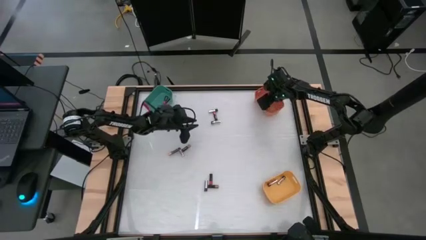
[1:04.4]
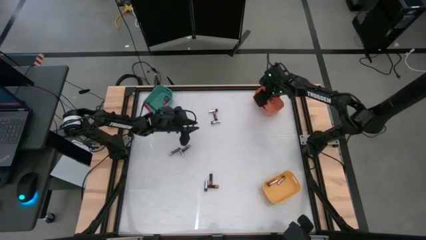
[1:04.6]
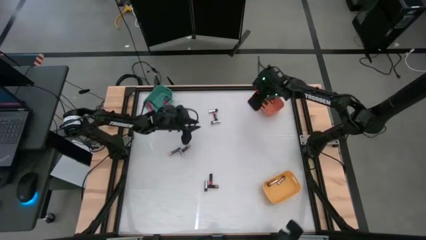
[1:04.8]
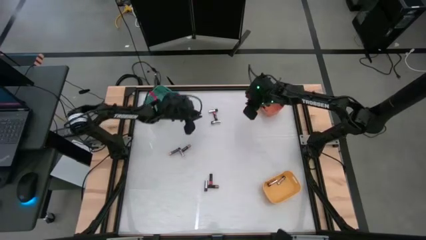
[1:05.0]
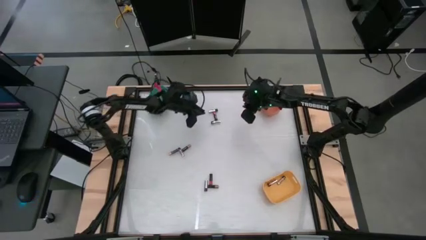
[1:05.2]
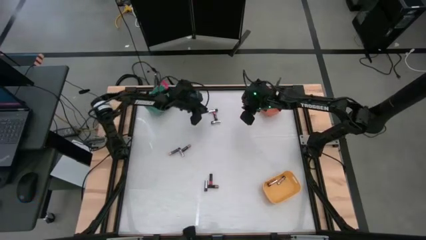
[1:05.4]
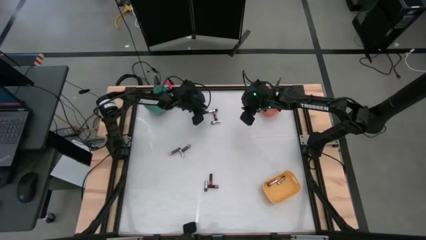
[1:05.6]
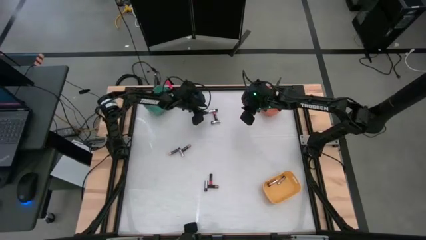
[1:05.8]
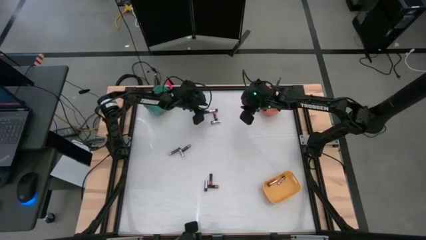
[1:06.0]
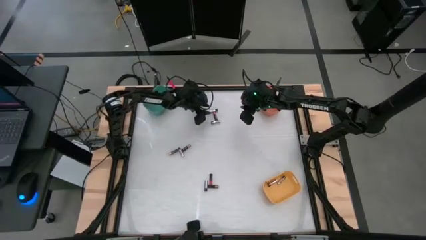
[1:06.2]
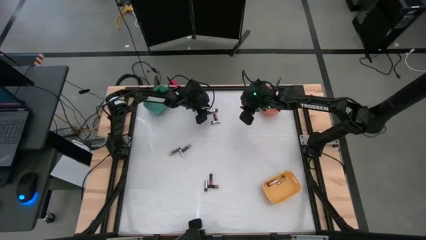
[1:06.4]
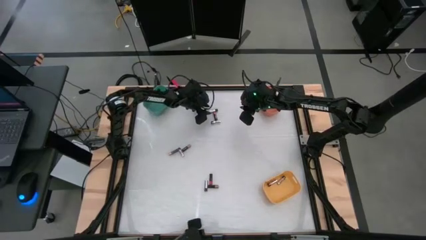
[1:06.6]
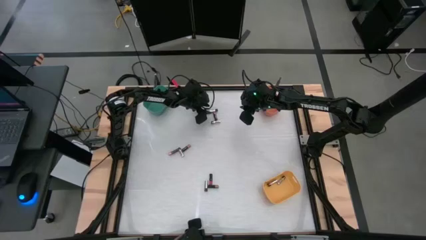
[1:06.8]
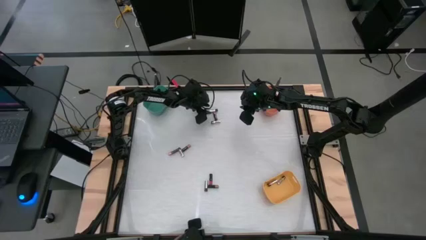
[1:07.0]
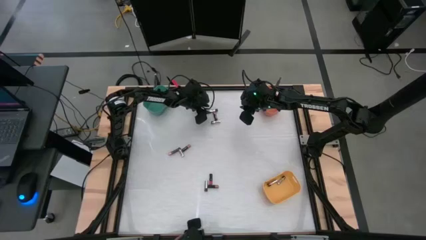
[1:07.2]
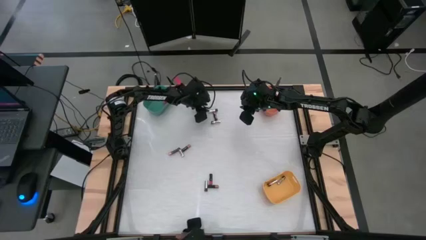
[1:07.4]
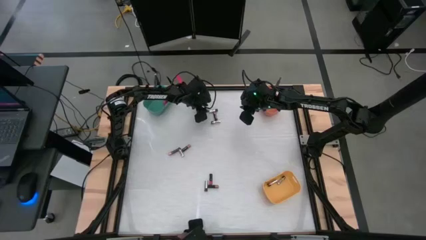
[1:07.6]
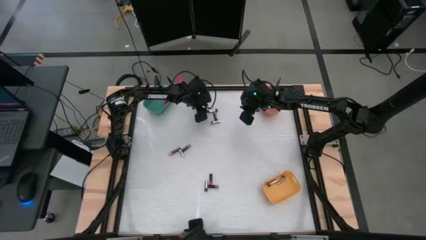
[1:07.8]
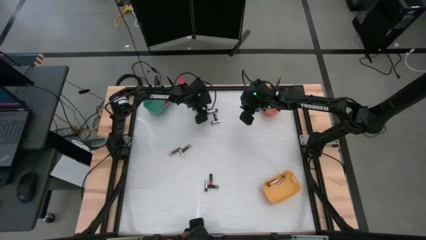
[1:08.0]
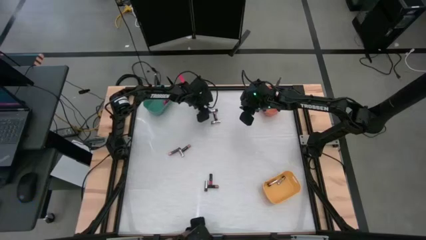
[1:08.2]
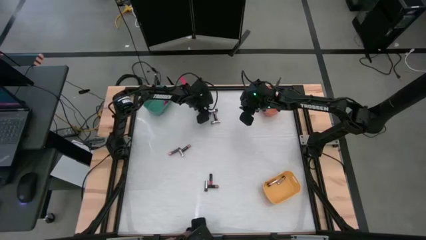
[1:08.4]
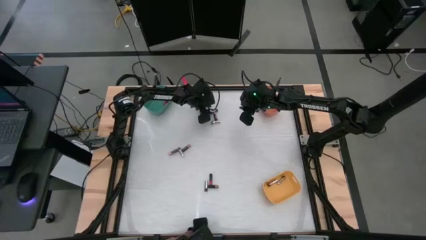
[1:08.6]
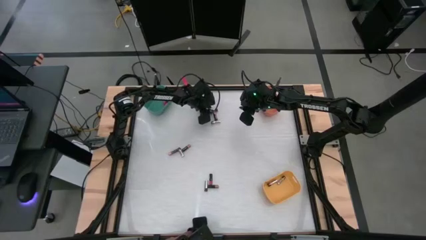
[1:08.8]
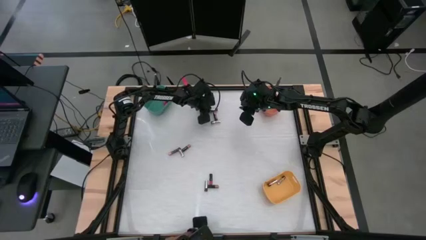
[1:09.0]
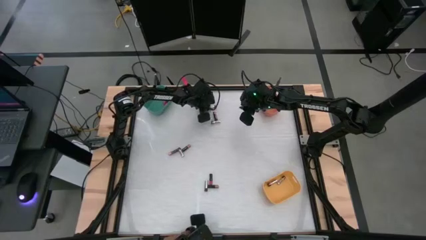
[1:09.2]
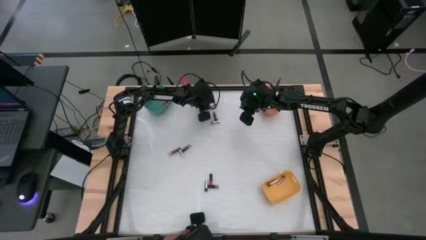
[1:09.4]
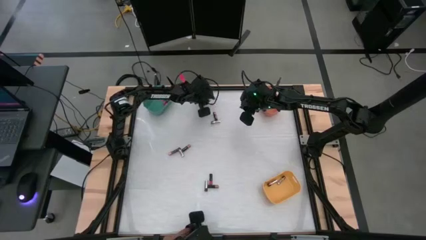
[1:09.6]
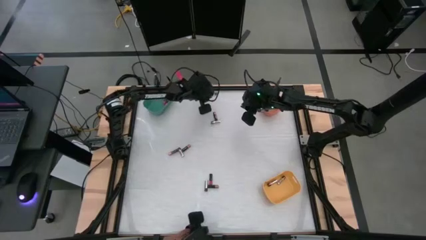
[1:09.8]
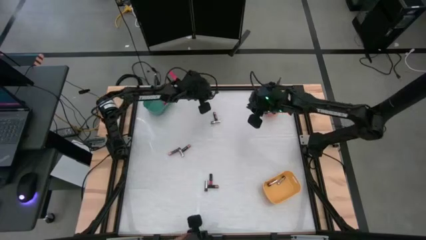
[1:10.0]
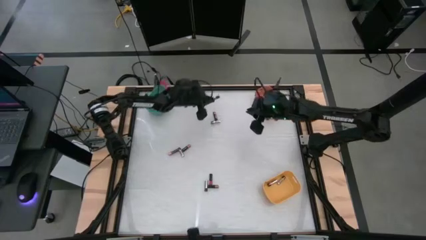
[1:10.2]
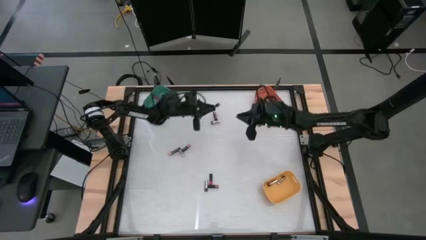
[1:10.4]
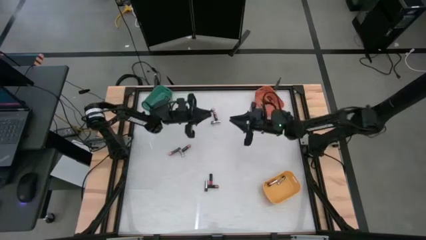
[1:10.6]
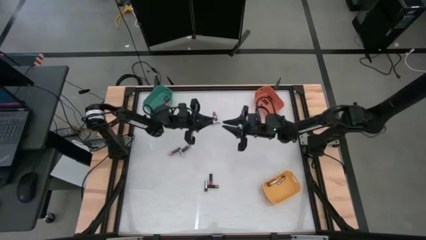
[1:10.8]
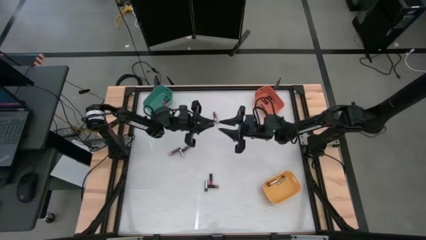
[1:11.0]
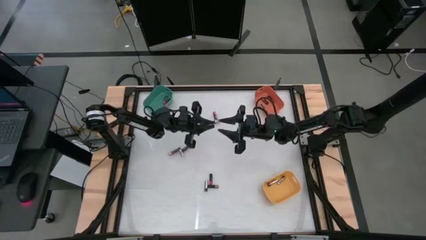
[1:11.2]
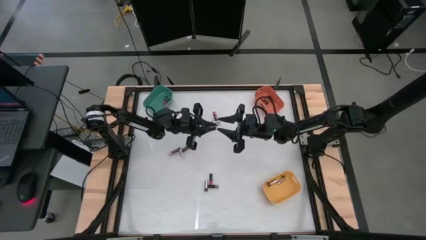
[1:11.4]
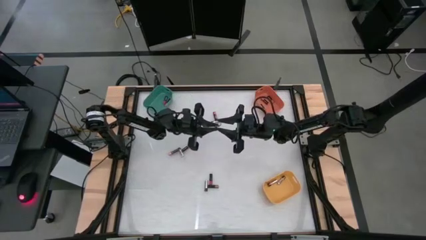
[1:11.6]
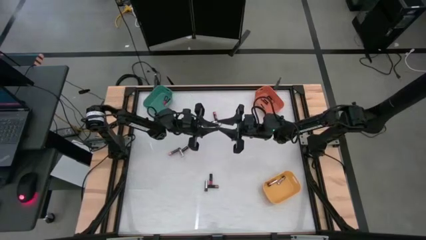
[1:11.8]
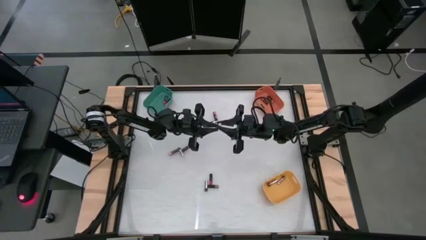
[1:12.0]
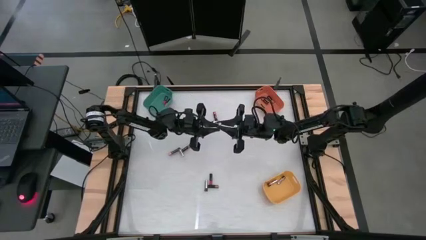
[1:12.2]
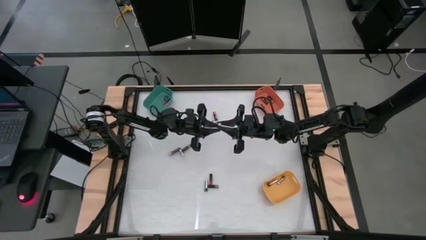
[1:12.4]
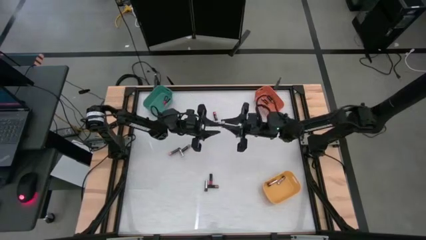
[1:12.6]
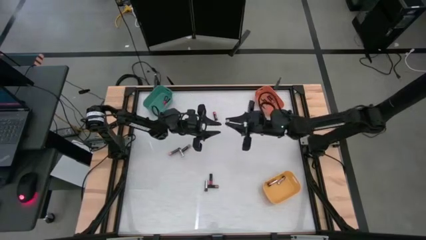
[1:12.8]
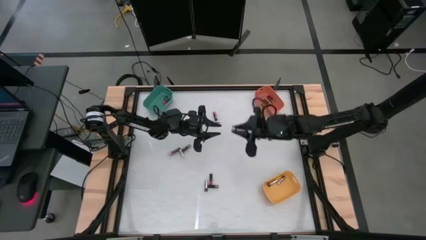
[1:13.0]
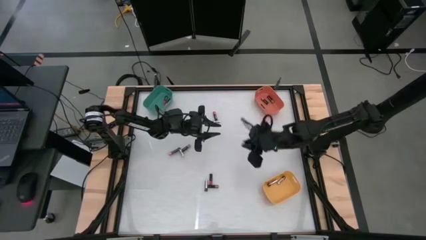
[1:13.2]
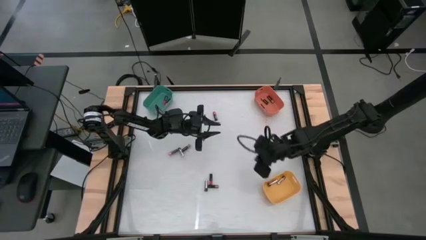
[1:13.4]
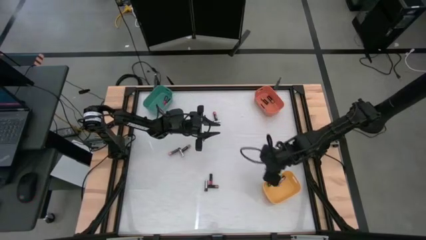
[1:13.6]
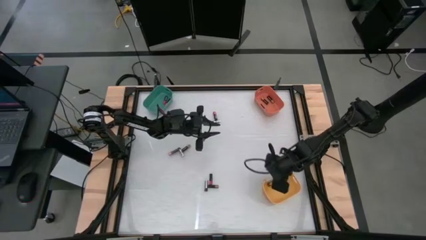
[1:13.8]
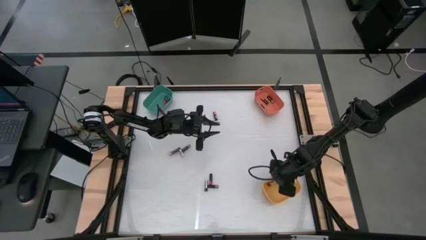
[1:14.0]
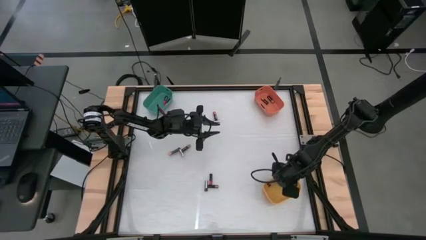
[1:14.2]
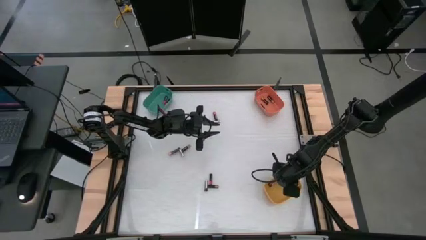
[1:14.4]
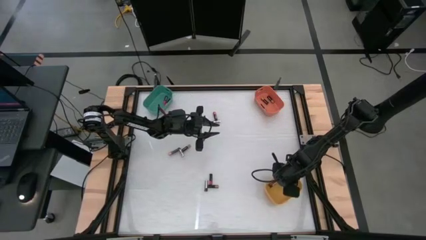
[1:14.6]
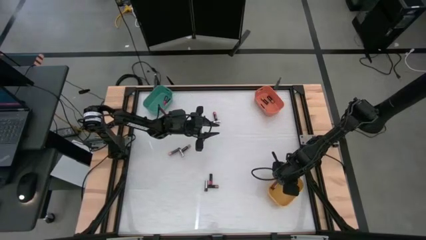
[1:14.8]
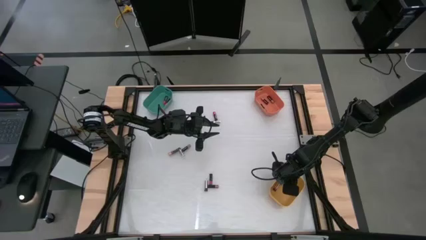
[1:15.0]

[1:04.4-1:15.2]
Task: Sort batteries
Put the silver battery into the yellow bin

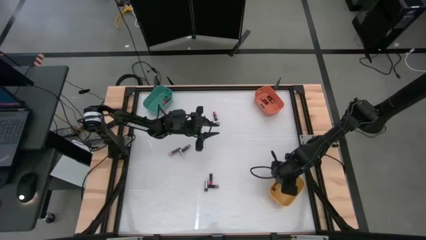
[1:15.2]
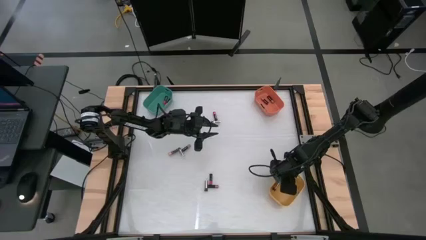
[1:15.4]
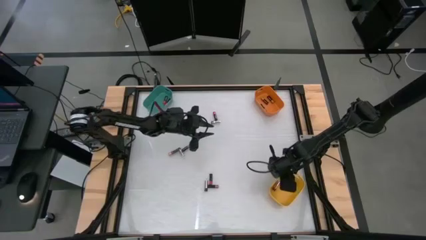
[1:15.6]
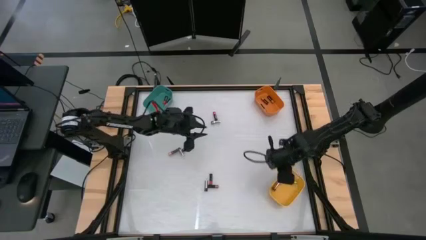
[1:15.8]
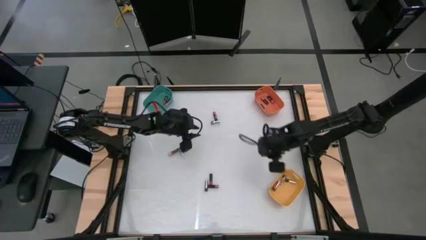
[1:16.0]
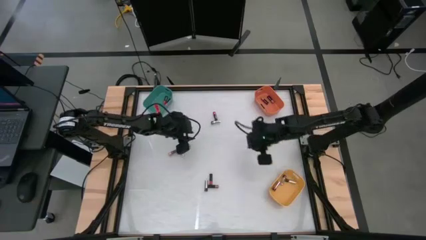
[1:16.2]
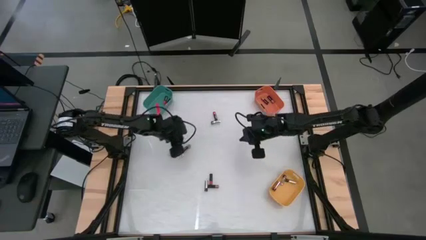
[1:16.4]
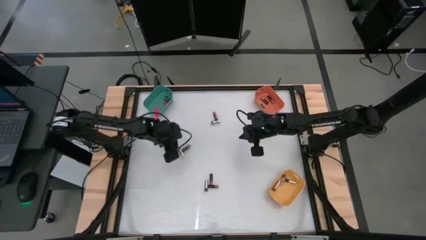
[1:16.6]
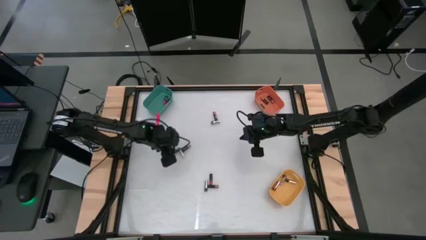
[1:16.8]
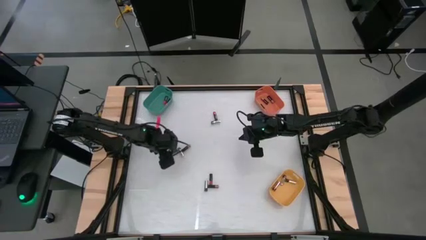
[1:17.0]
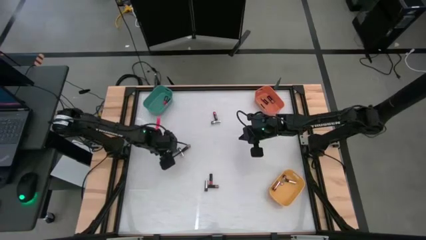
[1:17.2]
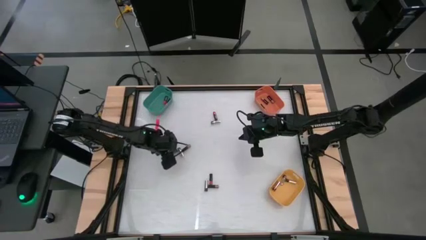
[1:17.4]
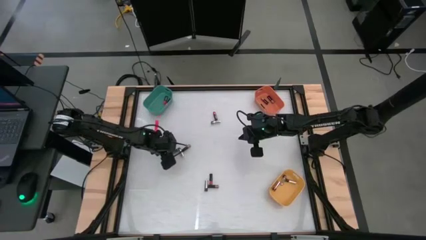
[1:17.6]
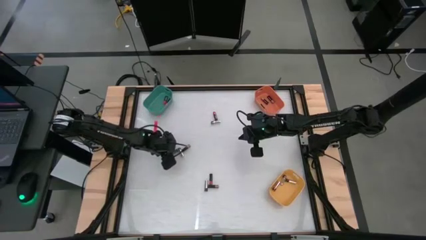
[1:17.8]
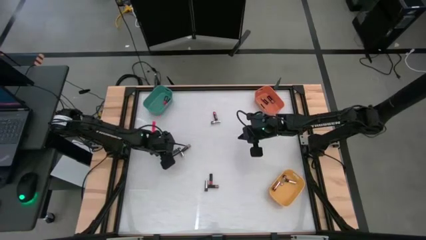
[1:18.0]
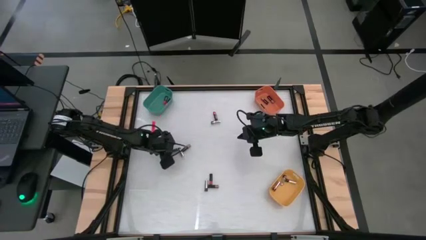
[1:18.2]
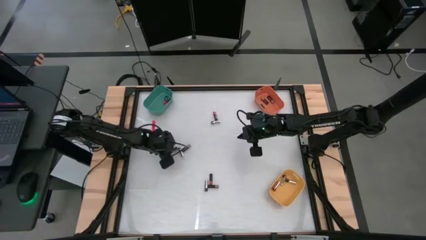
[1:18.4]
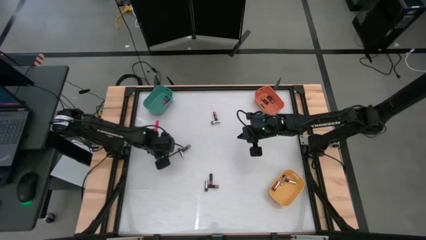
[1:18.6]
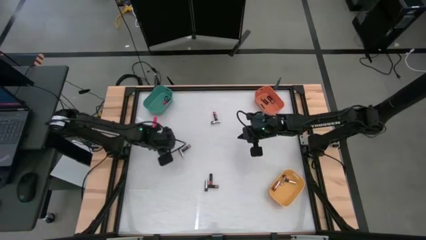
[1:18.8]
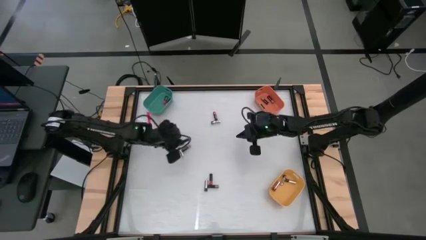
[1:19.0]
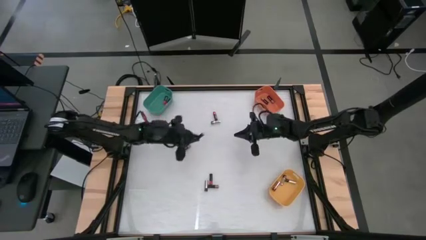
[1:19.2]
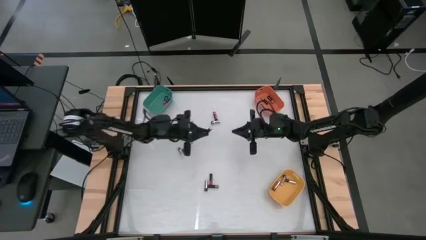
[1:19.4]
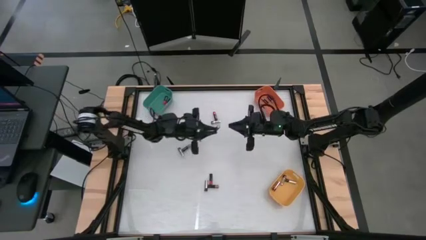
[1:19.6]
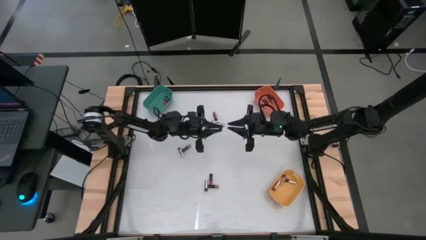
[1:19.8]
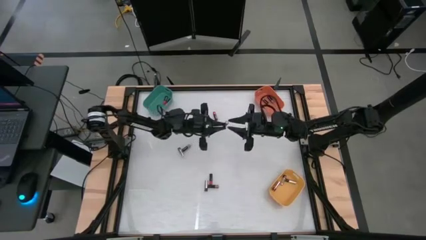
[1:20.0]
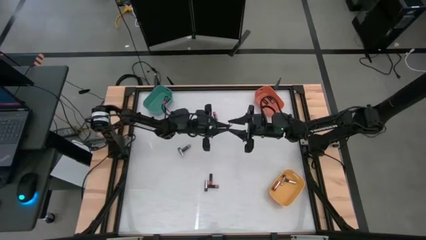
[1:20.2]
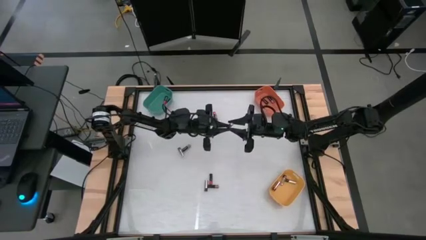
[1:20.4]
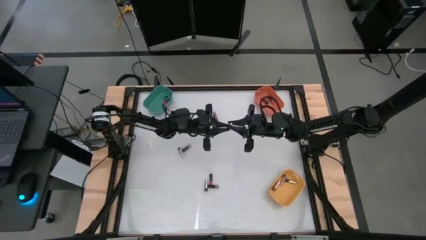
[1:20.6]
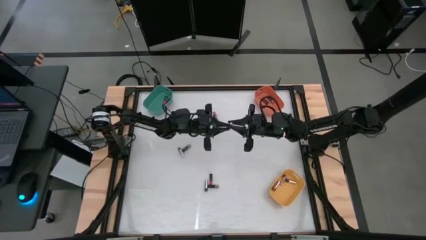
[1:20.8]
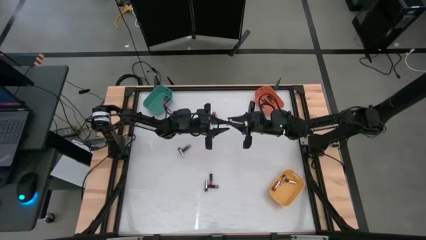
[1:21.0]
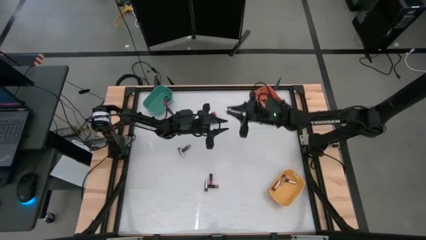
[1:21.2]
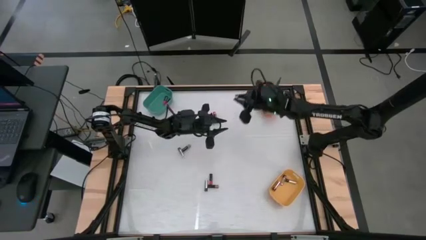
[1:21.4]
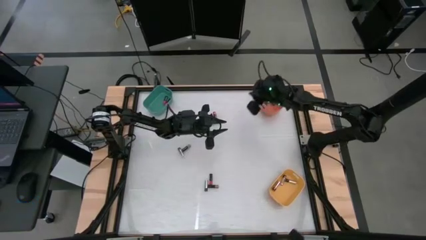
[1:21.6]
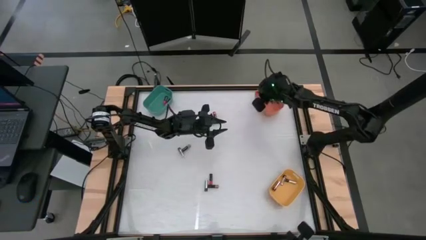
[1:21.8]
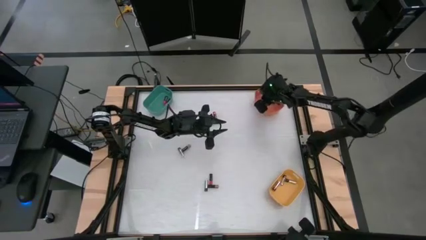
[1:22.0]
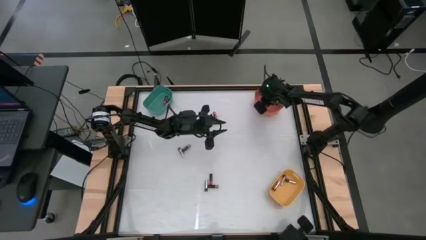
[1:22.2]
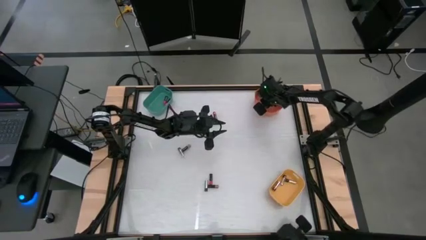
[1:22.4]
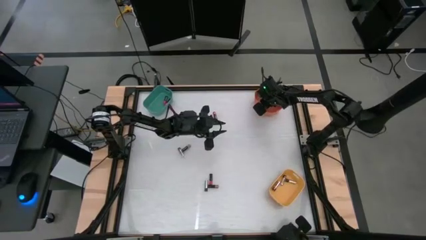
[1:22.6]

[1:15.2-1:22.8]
Put the black battery into the orange bin
